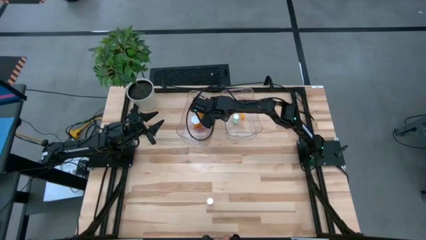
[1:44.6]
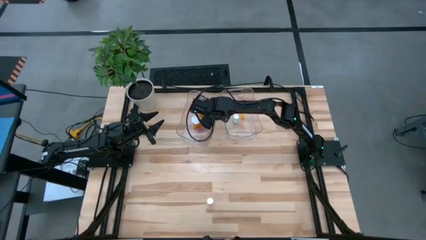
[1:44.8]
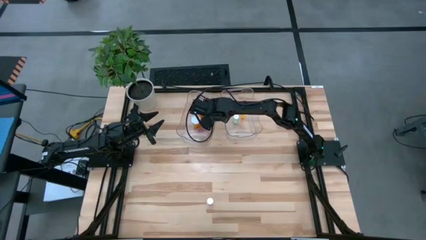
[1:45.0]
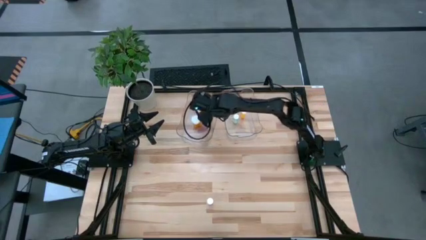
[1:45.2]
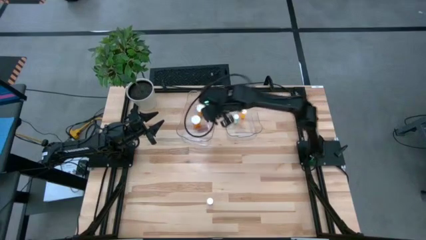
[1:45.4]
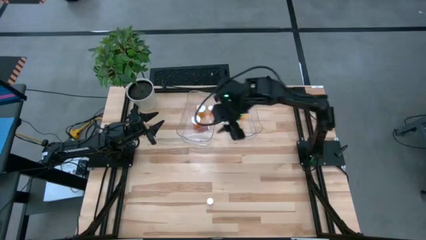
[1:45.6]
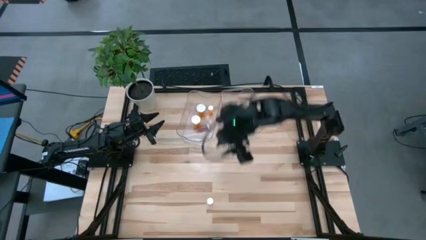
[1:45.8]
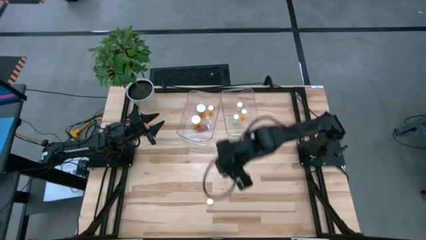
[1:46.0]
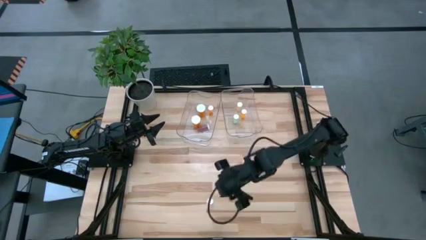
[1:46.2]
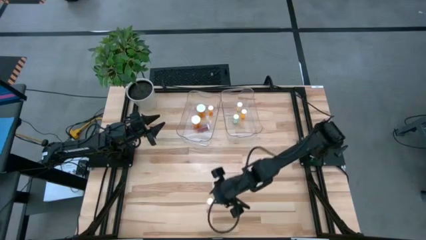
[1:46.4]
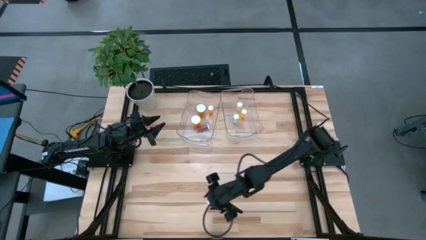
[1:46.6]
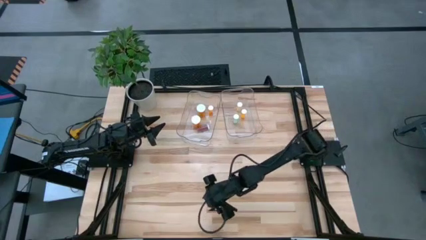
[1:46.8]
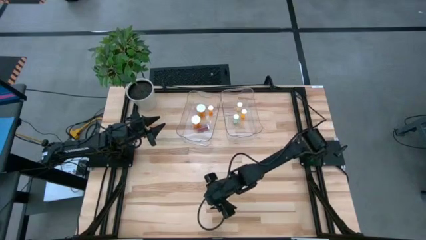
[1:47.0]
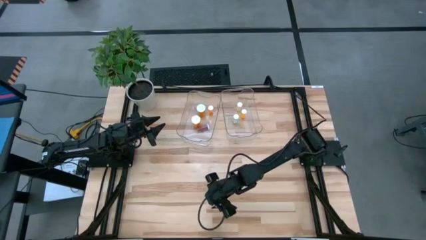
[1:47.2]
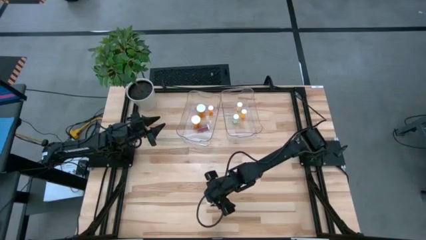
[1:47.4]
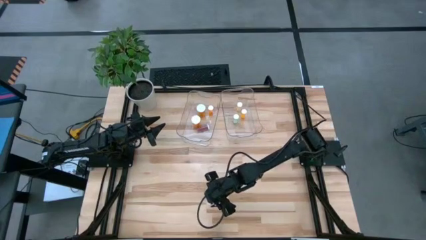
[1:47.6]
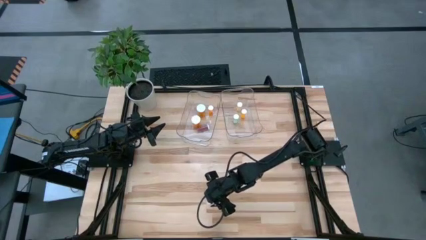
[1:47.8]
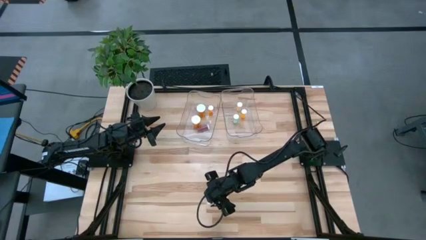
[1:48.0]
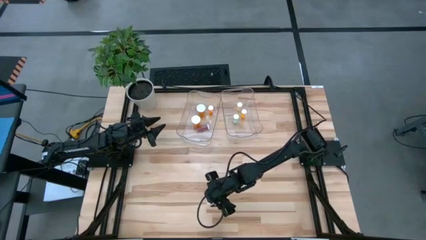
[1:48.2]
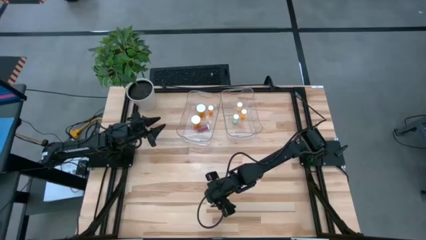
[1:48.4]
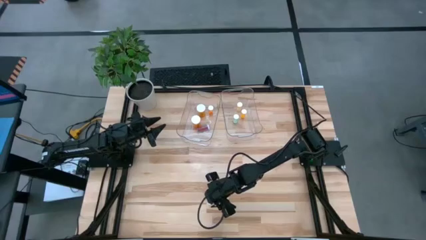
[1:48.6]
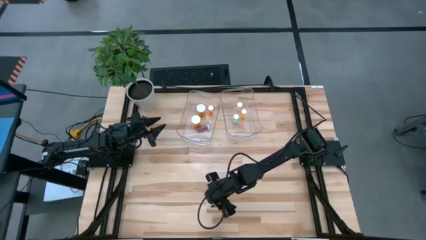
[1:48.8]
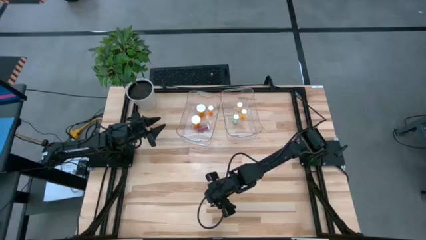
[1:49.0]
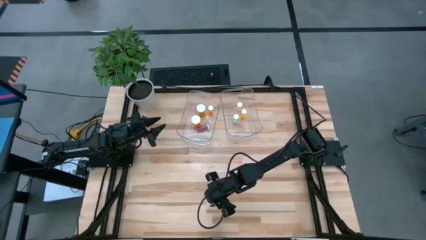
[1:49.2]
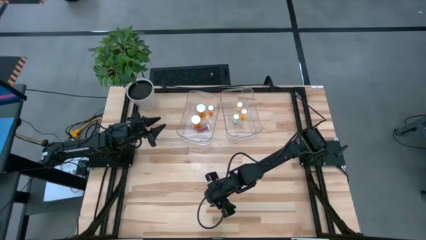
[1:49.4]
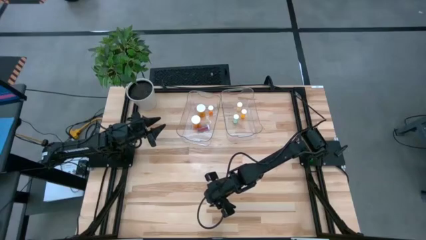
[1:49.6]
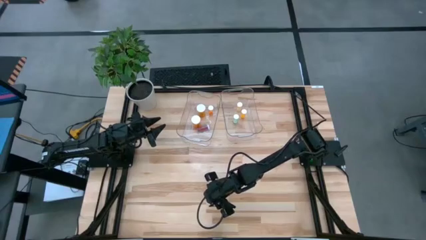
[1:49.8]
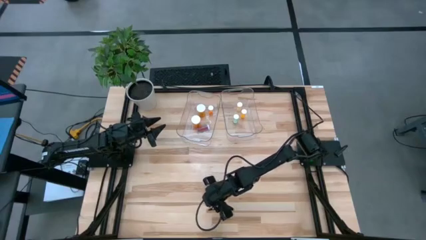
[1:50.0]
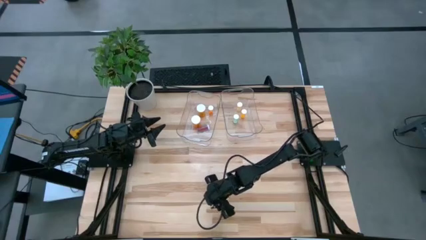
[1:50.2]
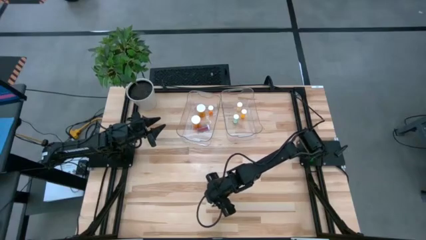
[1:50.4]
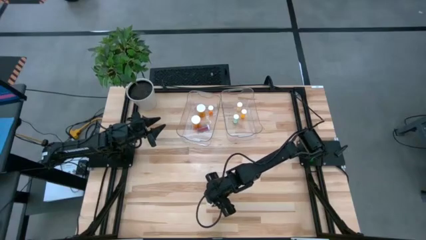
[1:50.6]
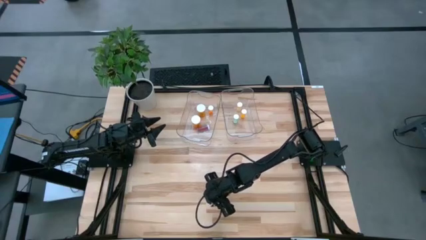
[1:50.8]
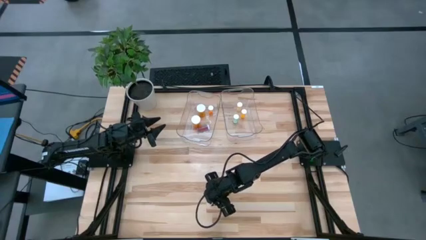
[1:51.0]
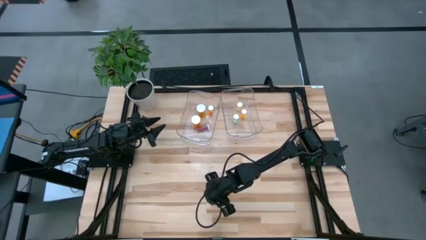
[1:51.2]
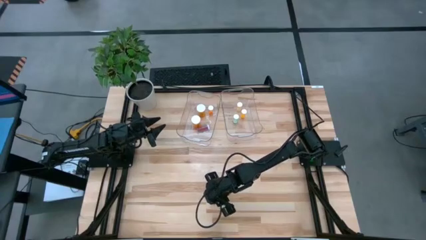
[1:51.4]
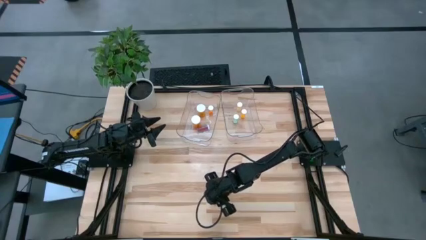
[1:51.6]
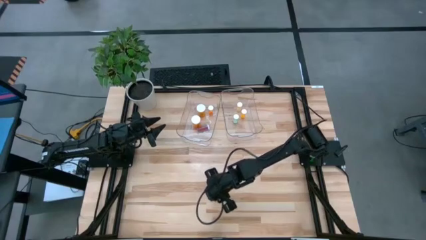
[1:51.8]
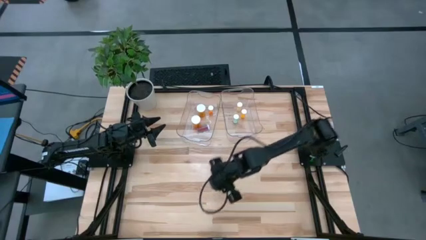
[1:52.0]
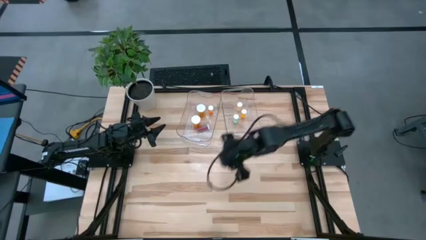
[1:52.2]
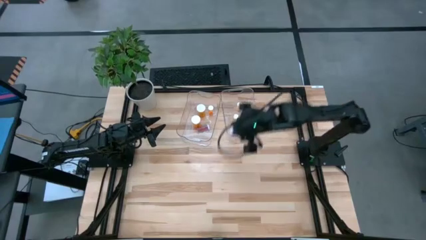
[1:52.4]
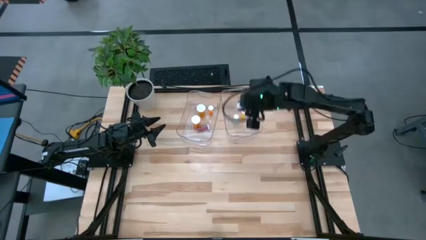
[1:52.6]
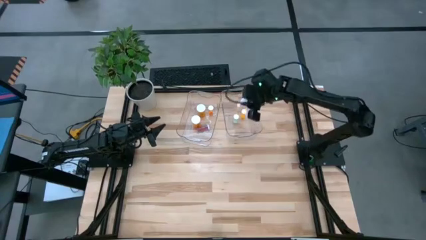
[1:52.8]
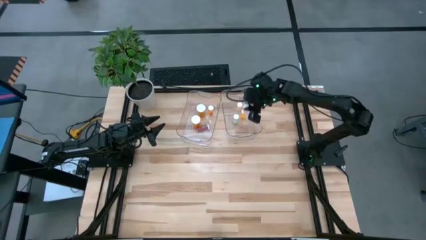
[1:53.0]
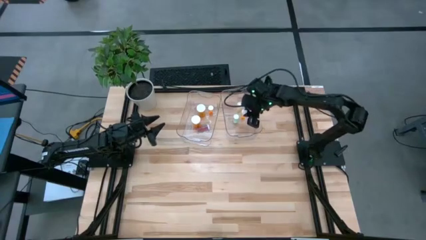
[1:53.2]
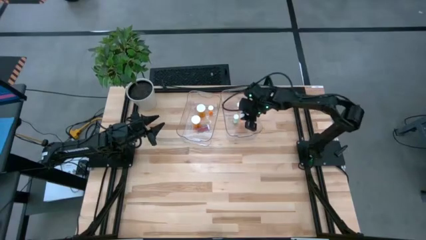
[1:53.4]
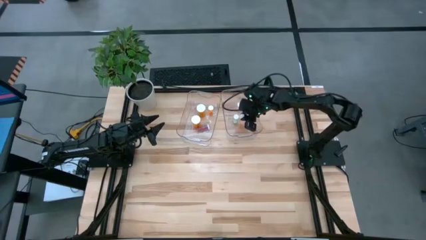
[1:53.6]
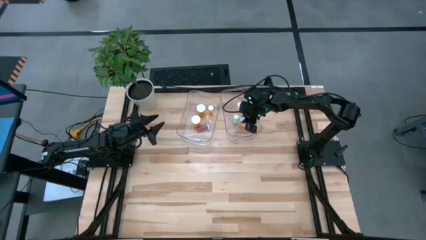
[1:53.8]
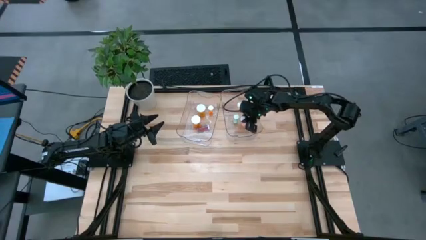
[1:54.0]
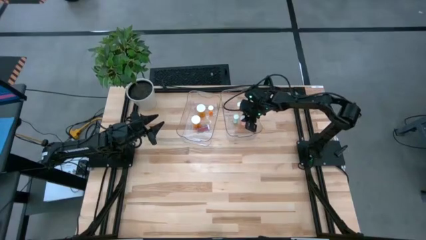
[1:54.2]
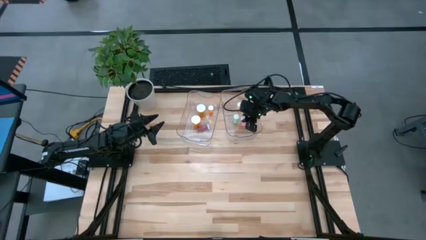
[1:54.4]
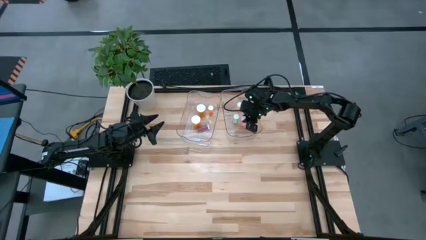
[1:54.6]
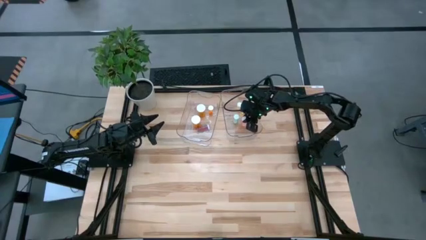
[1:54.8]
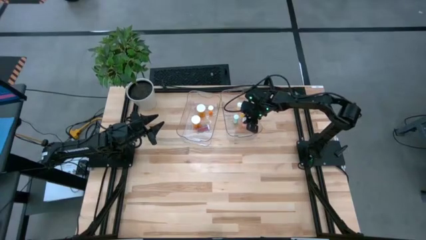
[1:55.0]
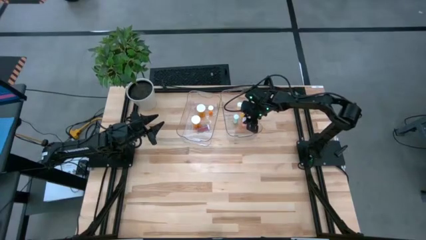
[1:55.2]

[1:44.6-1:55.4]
Task: Pick and place medicine bottles into bin by pill shape (circle, oval)
Put the pink tablet bottle into the right transparent bin

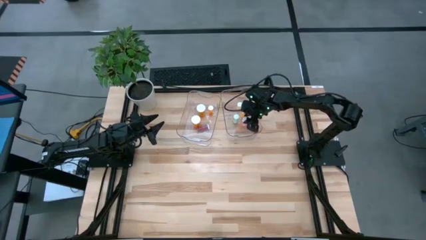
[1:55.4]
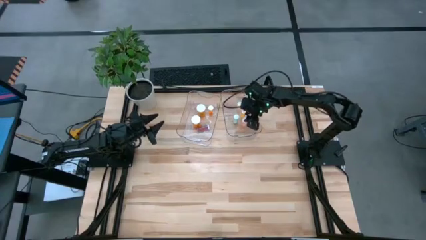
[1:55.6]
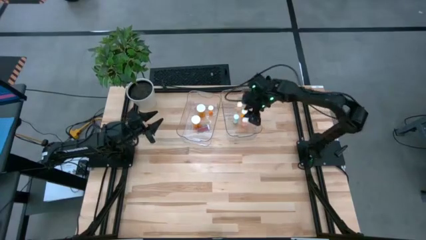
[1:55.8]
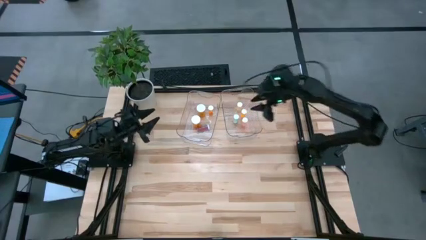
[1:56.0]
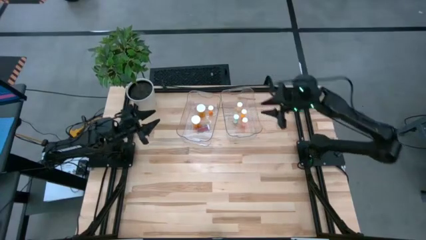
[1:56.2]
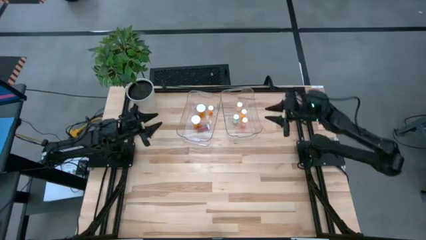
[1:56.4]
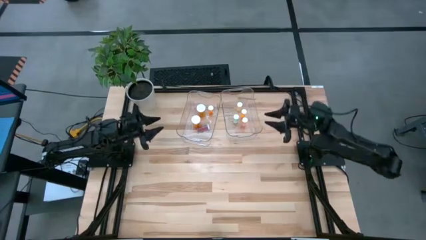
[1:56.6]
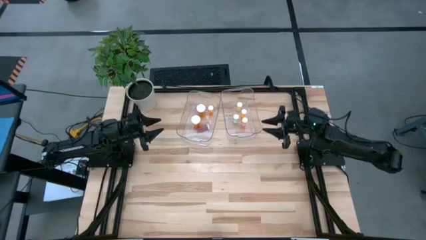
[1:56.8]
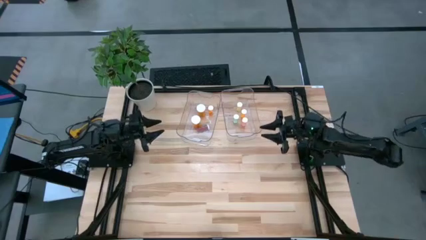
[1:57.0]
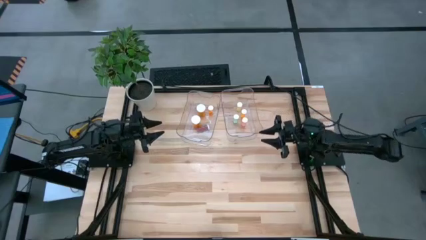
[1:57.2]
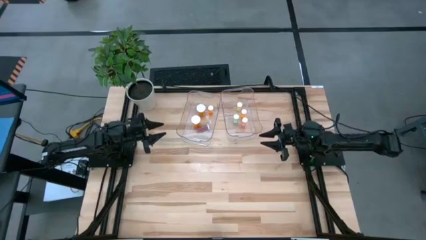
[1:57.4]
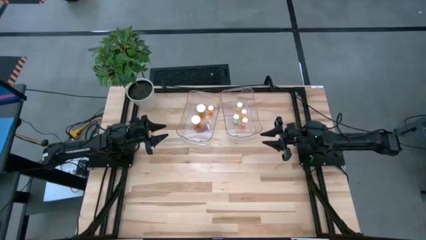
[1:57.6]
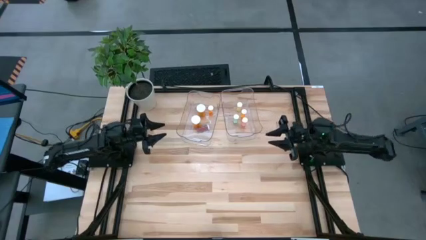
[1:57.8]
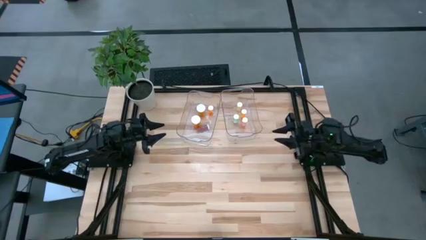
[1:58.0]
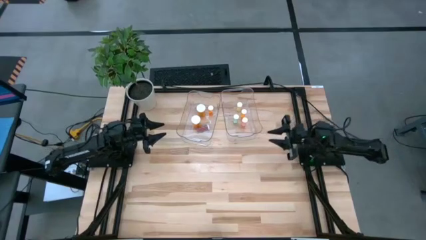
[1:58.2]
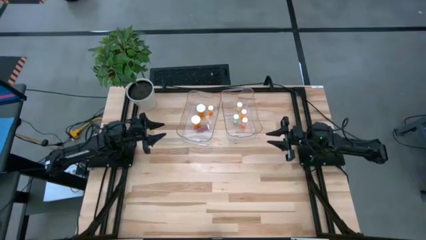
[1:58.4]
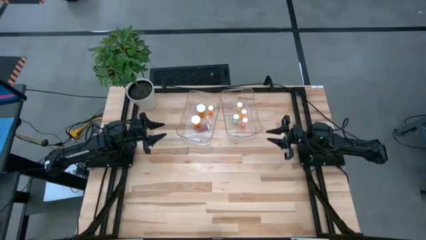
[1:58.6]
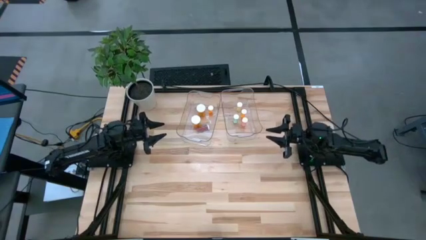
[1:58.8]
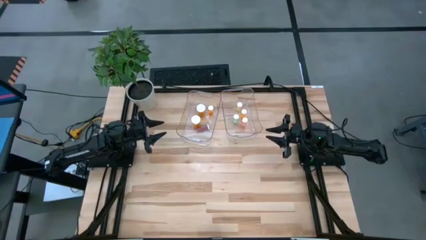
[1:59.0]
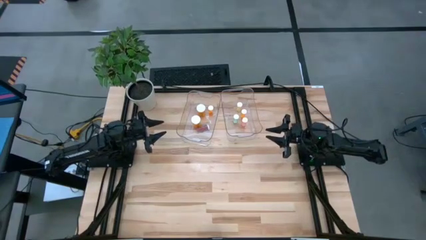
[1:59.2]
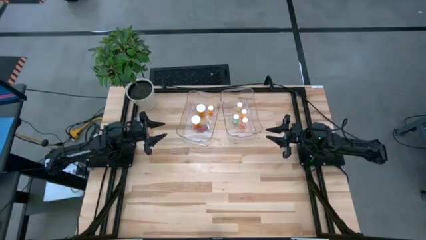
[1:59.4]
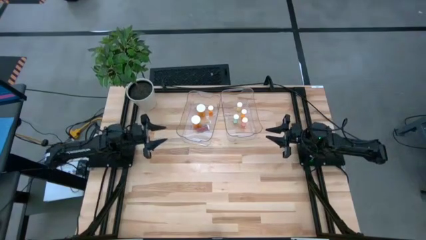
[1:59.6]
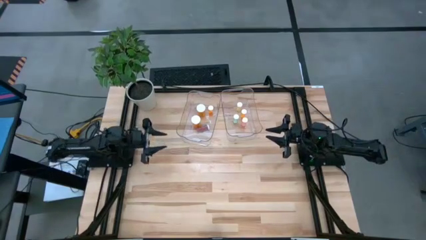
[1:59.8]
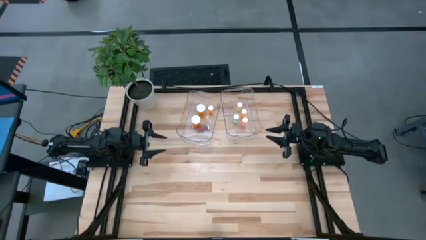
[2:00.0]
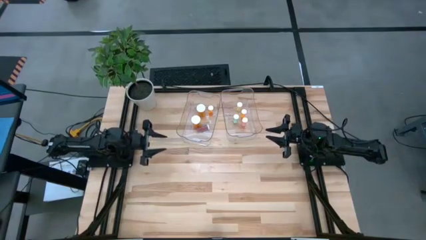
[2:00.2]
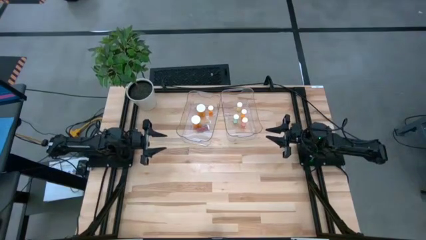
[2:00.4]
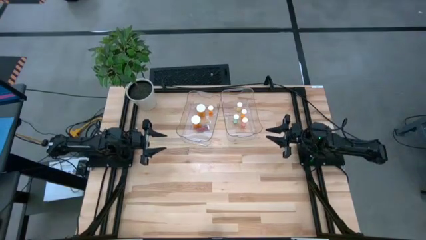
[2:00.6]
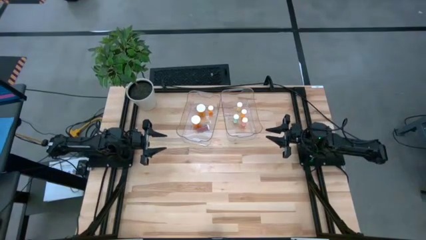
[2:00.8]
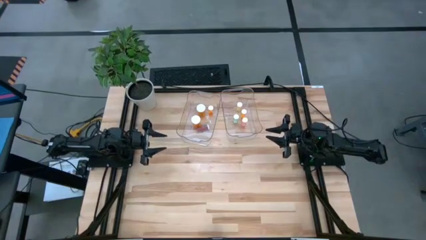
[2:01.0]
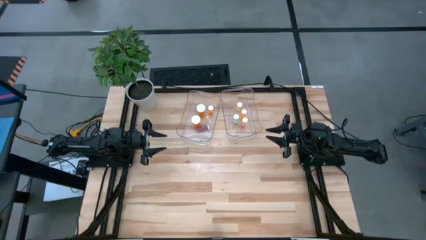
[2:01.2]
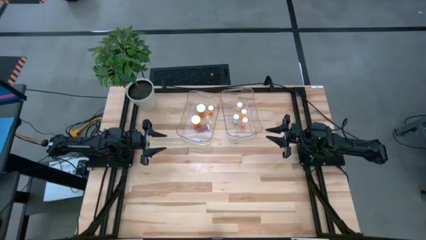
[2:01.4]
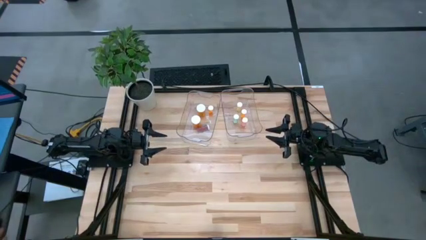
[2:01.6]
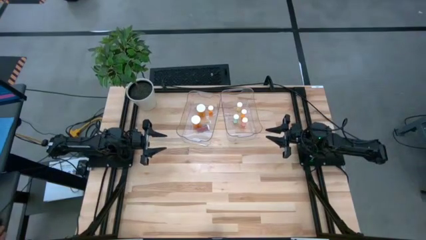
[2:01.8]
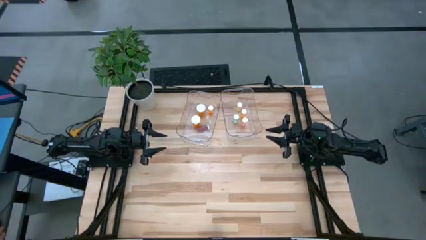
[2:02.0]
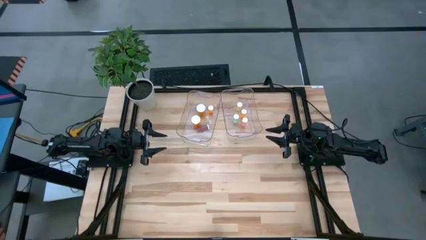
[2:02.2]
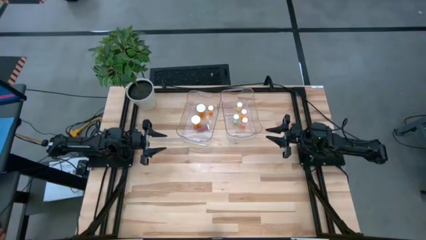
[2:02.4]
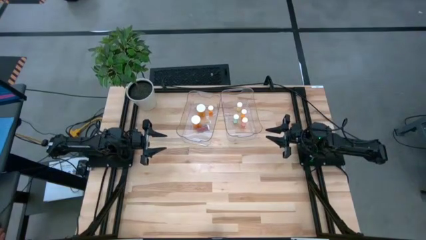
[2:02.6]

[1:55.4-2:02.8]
Return to Home Position
